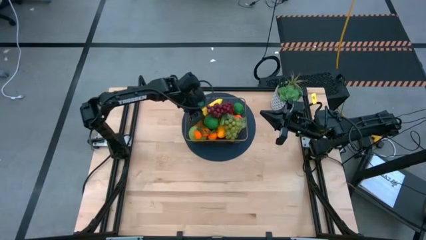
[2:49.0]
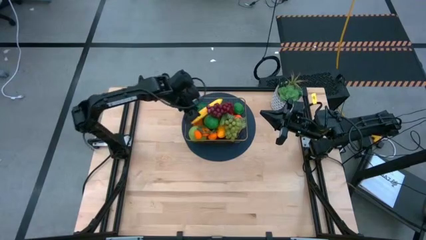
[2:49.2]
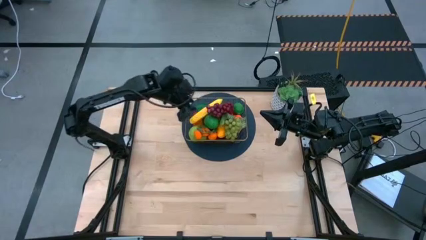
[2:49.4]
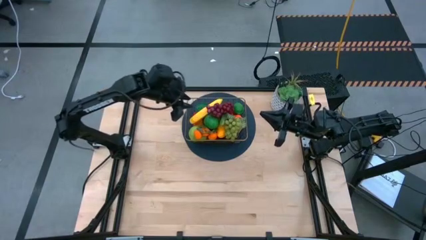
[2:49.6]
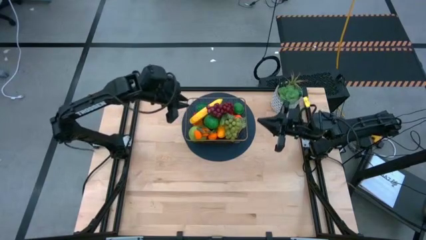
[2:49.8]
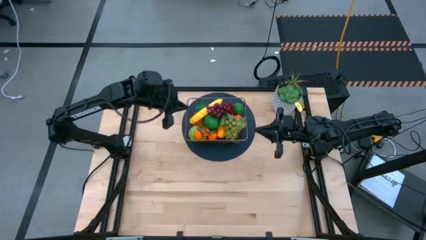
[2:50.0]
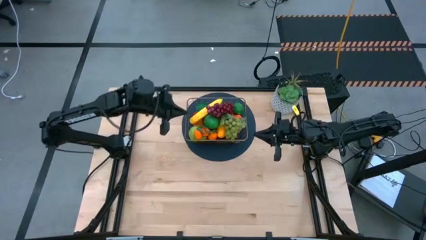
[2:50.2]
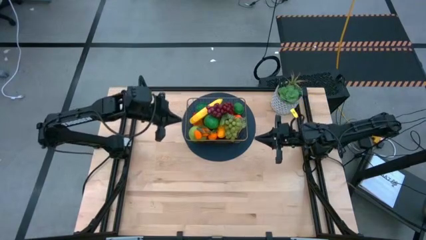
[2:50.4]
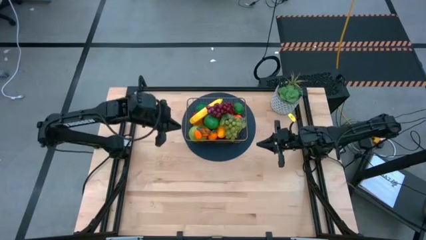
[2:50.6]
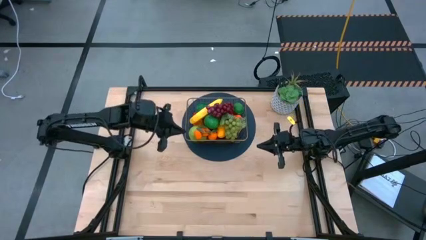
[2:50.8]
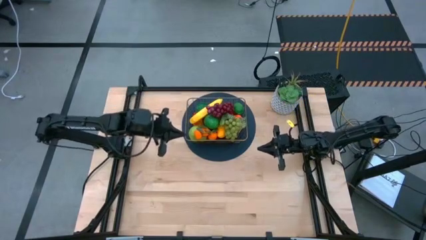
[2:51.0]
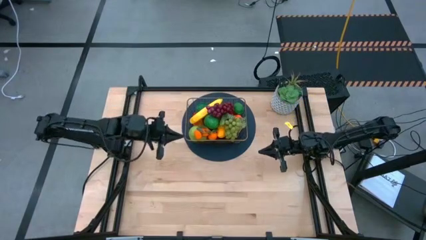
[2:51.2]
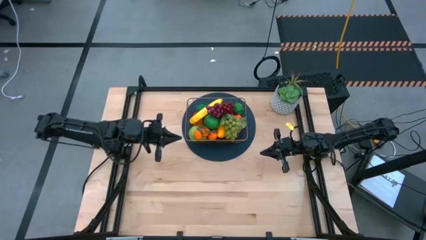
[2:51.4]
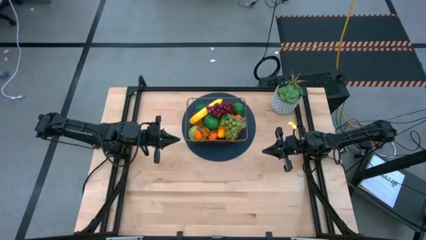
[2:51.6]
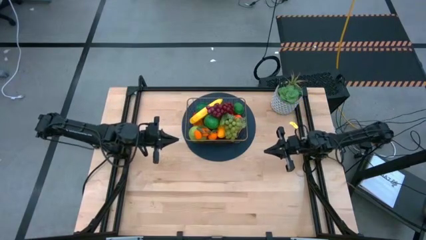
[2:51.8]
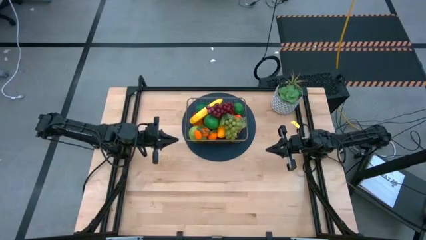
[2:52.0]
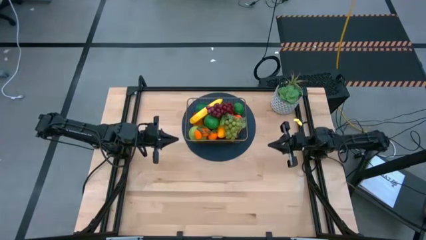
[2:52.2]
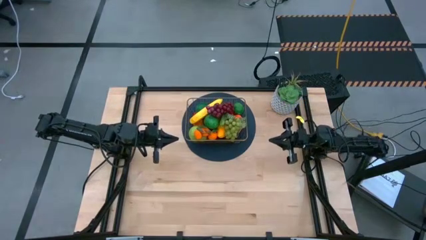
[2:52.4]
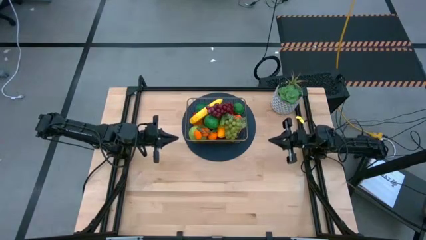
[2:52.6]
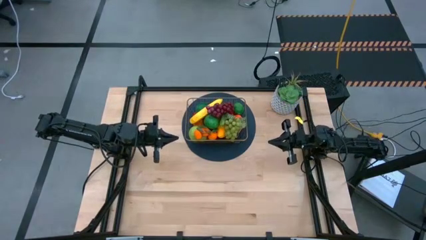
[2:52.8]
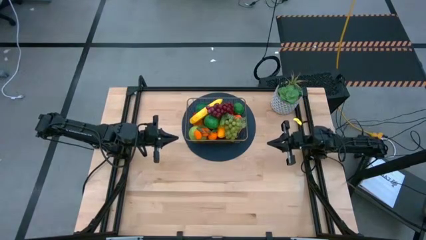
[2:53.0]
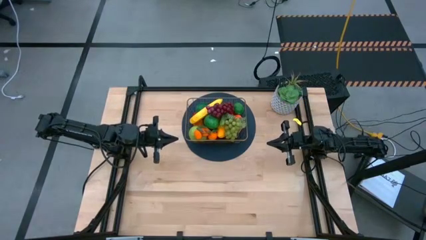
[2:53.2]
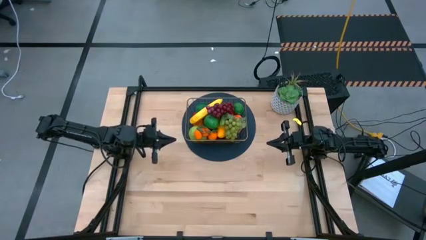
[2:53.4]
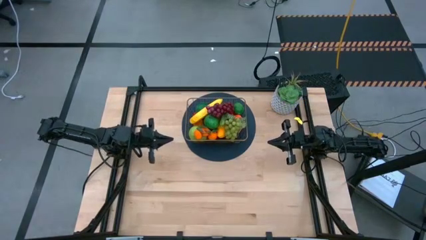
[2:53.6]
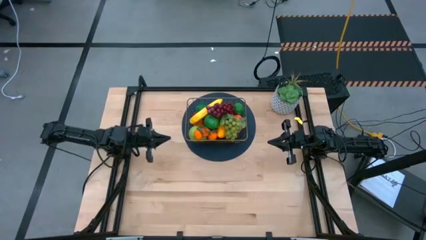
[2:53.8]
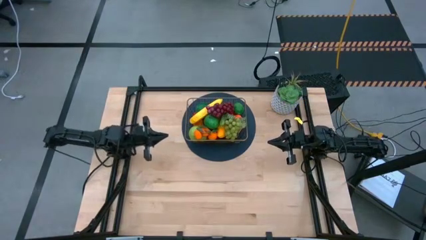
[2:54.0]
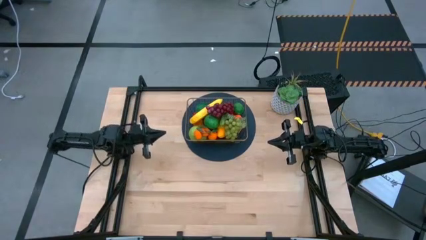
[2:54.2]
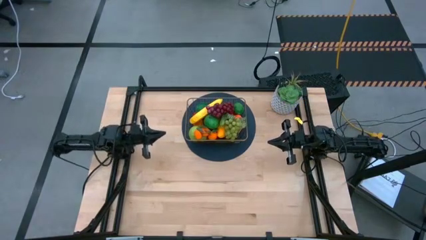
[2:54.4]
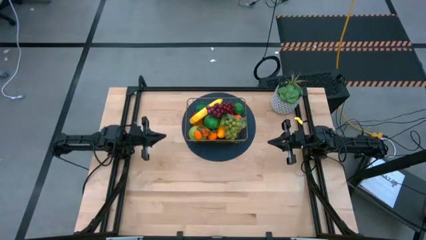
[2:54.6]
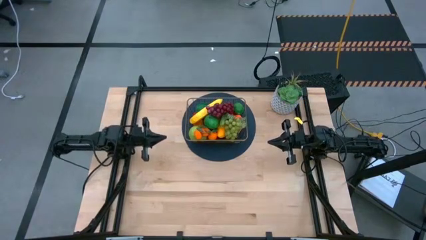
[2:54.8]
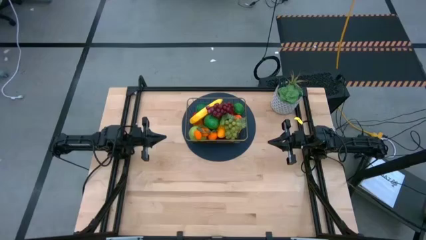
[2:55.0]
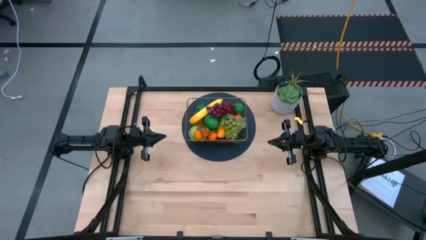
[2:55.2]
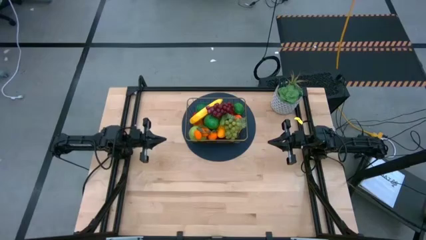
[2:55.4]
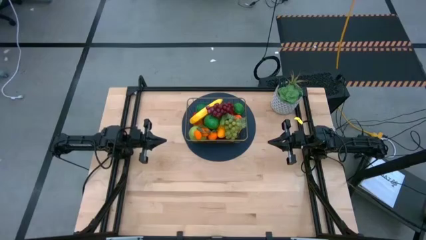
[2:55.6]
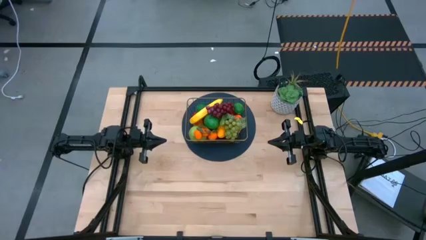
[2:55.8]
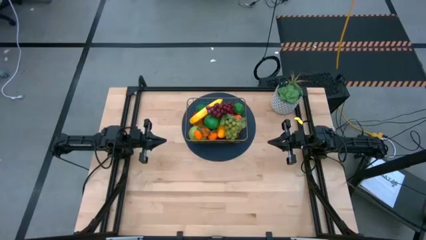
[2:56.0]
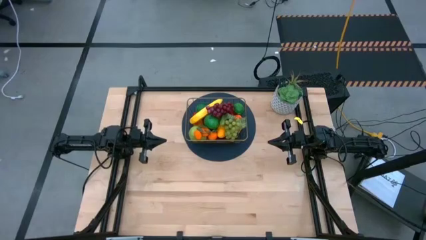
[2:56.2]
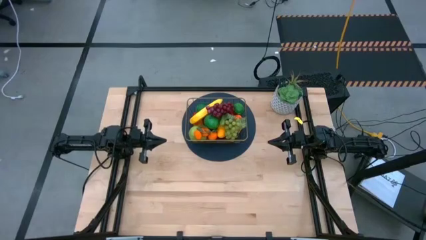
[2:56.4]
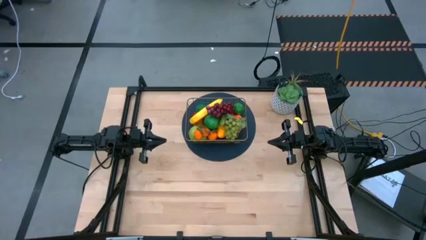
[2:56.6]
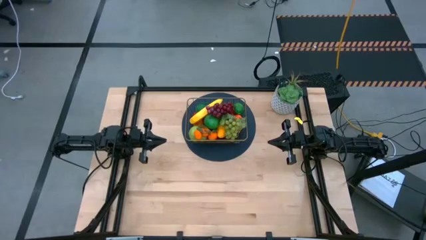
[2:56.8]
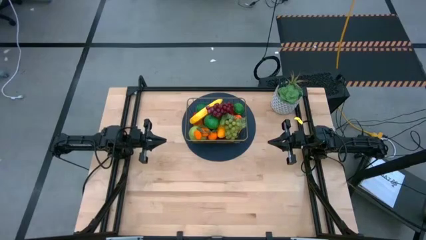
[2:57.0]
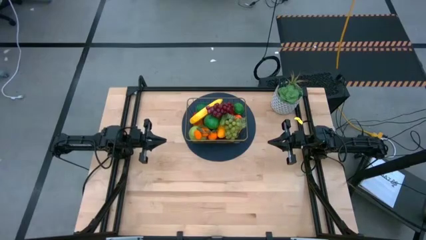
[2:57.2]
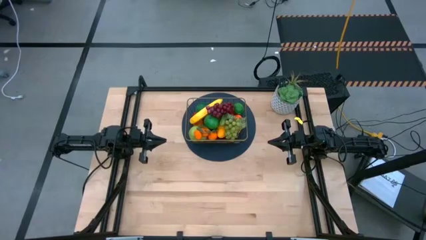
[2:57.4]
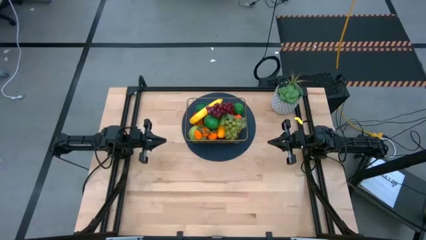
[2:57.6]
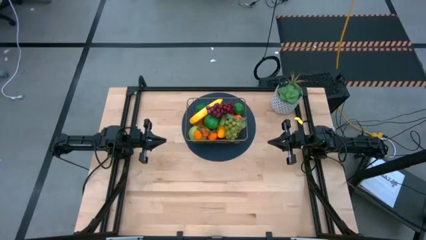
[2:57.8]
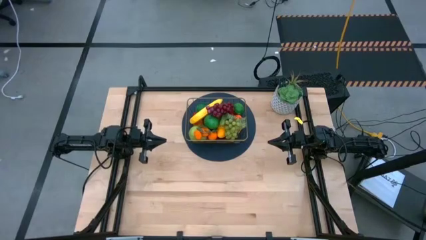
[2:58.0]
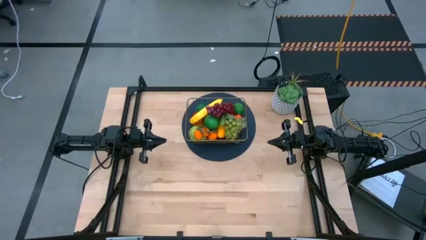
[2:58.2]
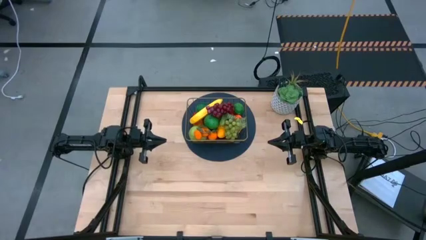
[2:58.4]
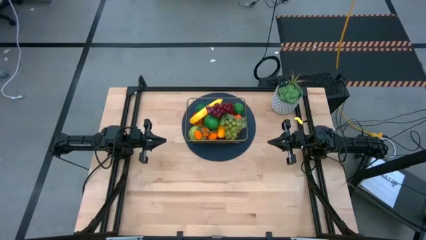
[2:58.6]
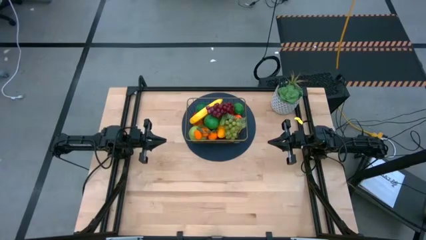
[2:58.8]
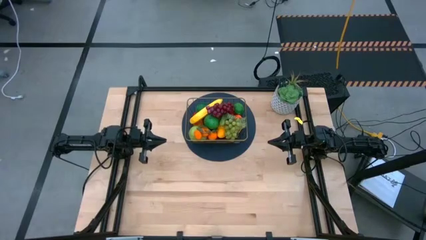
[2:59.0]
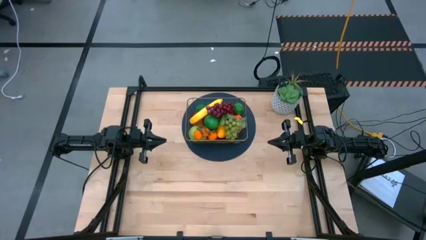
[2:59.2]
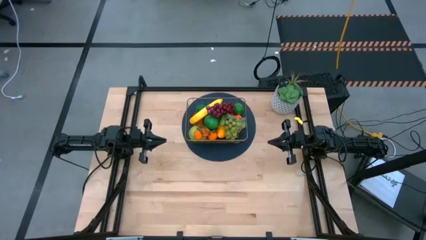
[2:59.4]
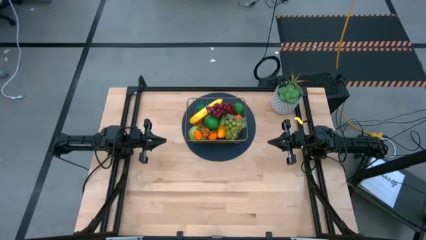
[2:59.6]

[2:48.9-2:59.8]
Task: Build produce basket
Return to Home Position

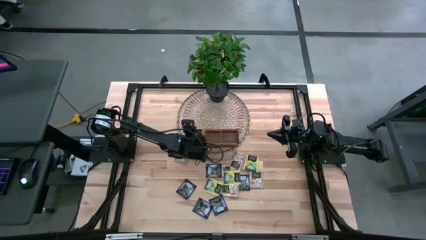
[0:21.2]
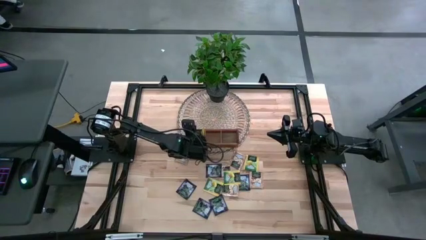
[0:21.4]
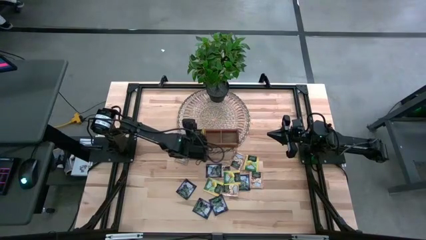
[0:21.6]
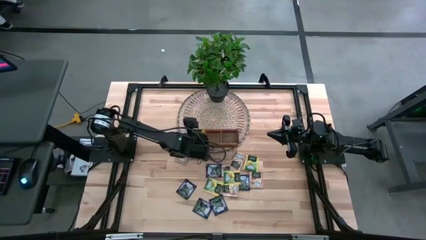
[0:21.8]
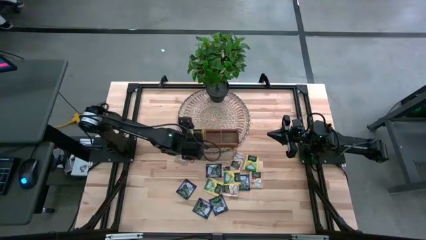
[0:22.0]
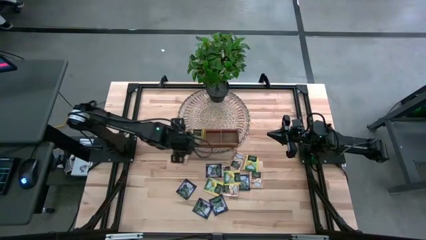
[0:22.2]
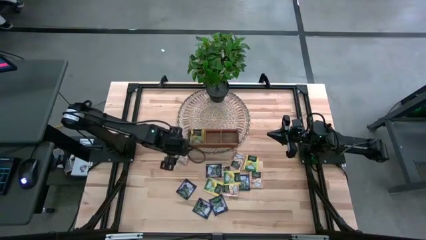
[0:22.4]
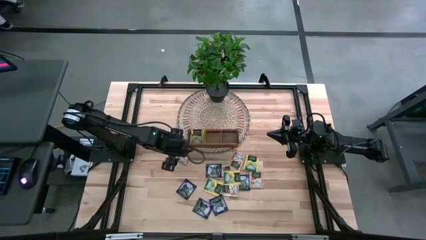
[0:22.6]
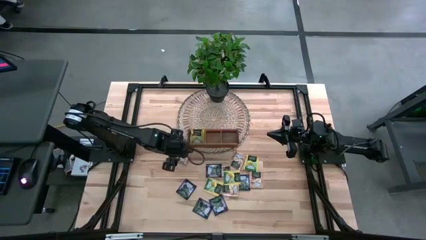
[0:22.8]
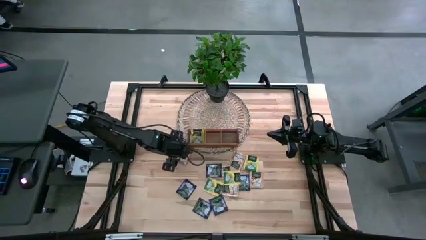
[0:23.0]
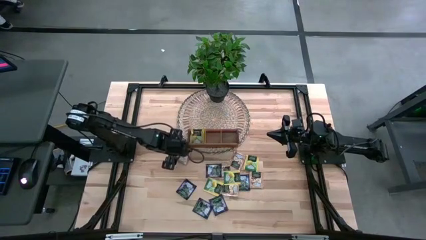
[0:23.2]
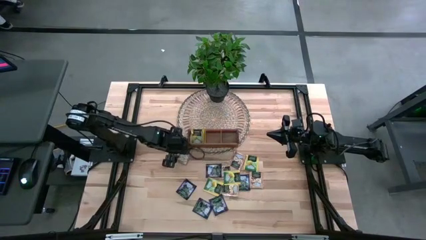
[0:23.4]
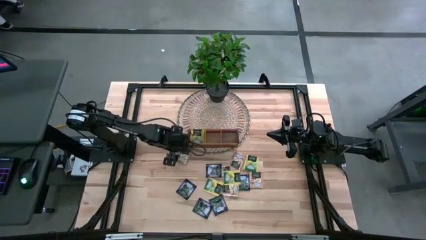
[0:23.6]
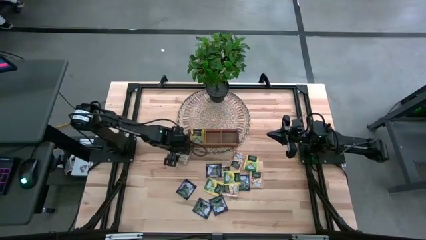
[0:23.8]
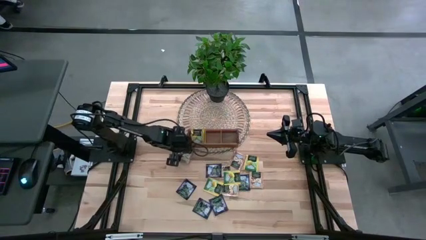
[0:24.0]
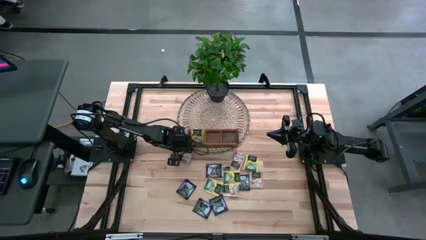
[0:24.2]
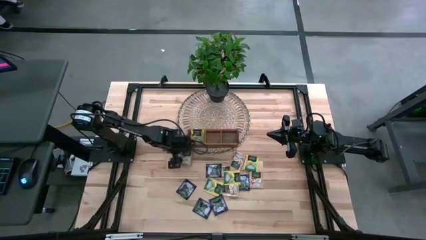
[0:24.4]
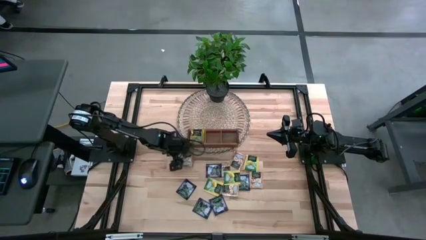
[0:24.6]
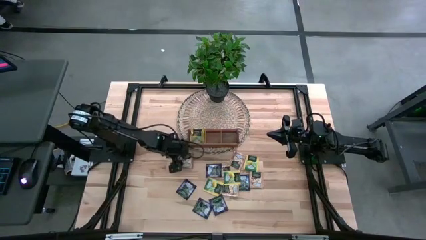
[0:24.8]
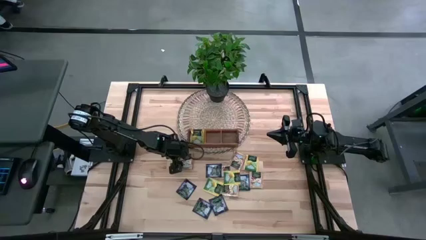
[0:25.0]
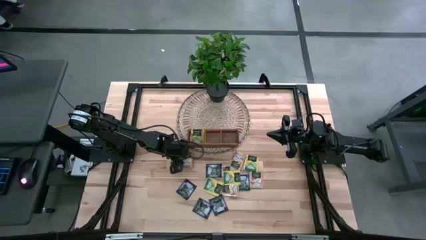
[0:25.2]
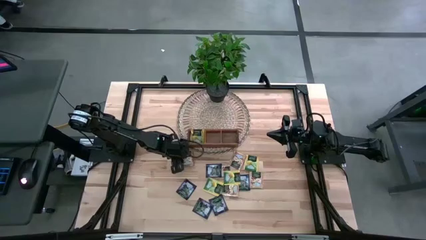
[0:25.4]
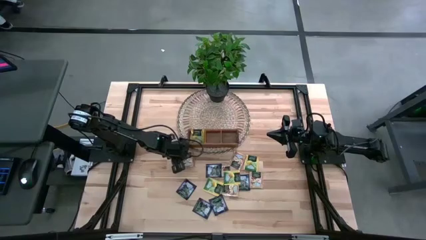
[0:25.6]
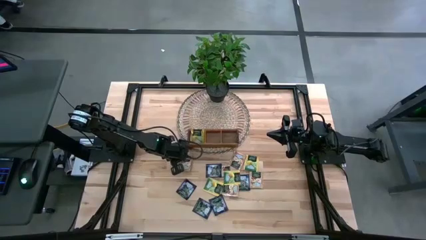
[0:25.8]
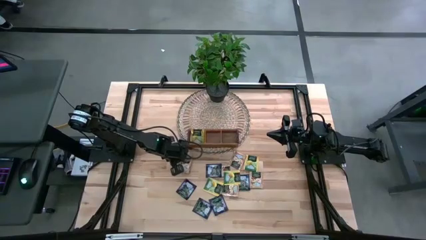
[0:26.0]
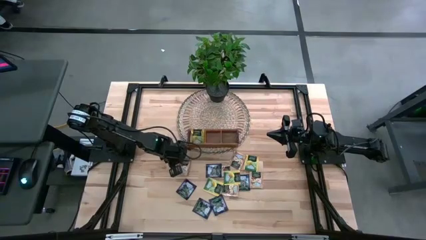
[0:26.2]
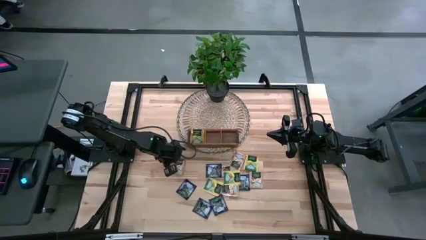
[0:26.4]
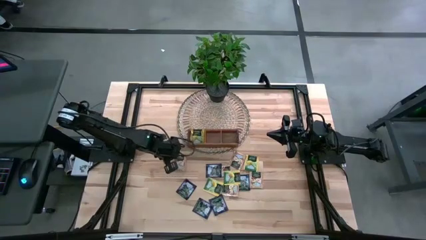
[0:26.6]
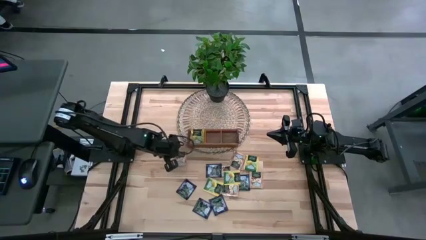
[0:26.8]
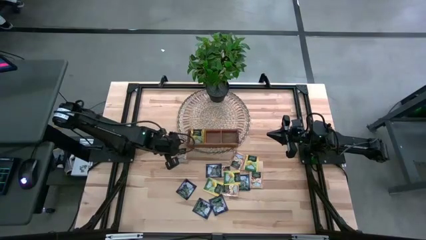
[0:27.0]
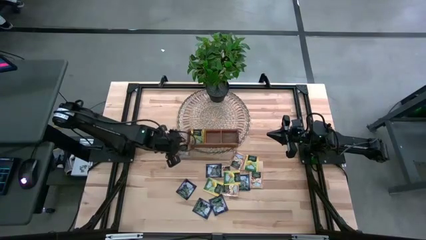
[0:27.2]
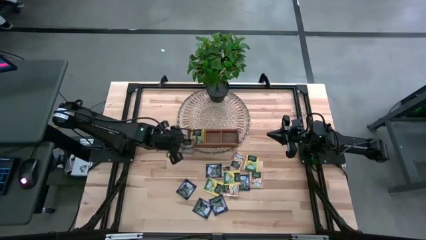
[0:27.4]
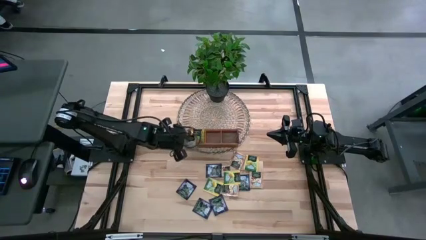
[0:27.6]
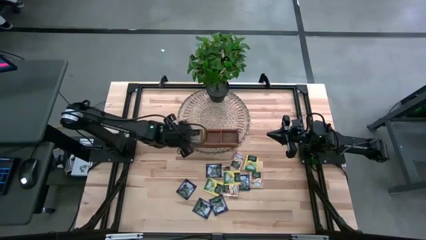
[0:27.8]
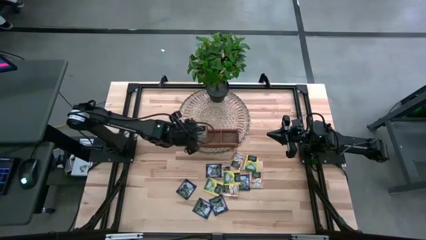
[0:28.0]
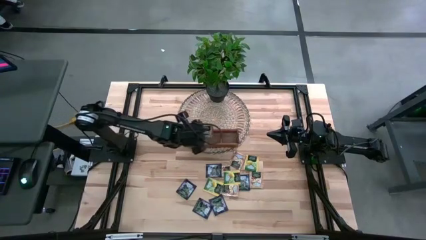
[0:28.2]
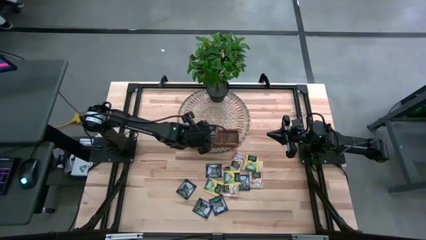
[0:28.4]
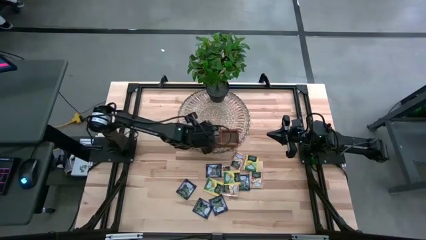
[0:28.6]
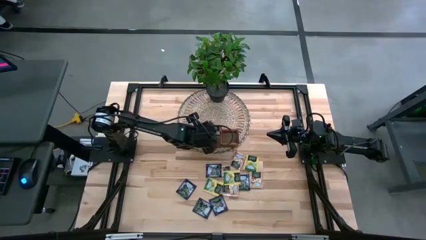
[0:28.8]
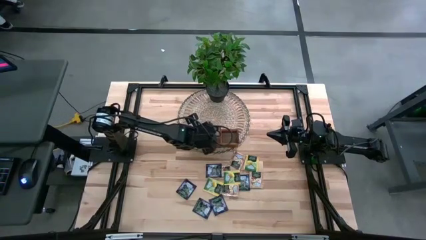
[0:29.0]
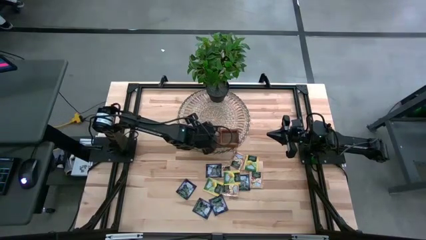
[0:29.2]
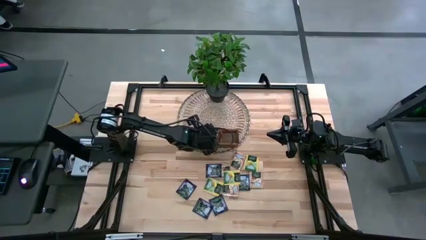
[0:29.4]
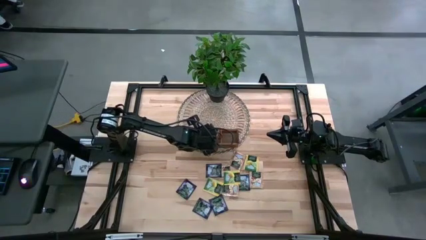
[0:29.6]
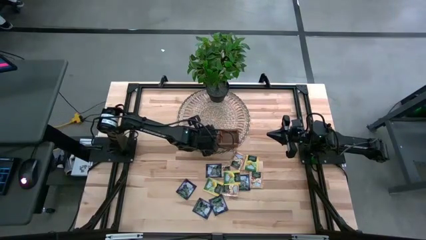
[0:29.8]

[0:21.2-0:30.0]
Task: Pick & Place Tea
Put the brown tea bag into the middle section of the wooden organizer
